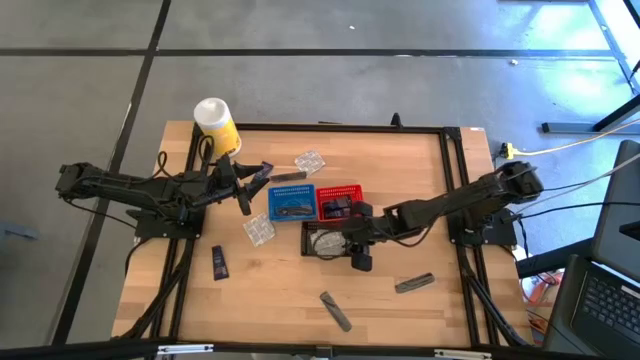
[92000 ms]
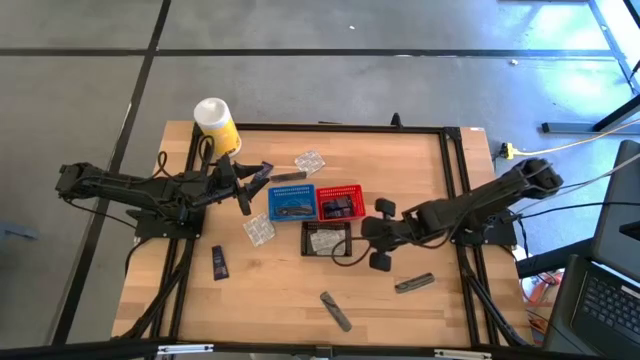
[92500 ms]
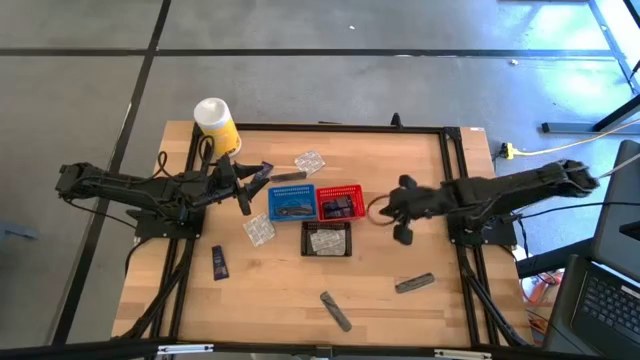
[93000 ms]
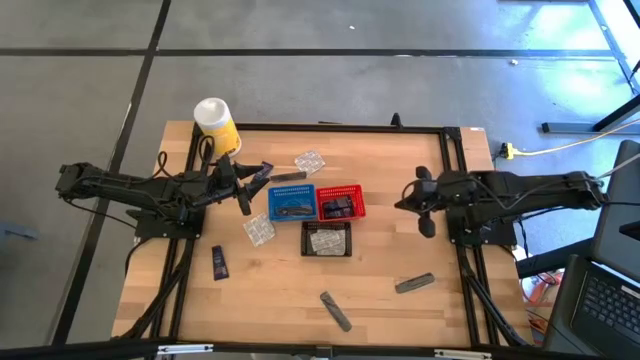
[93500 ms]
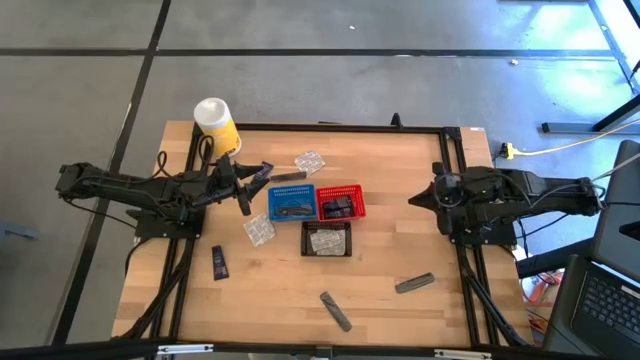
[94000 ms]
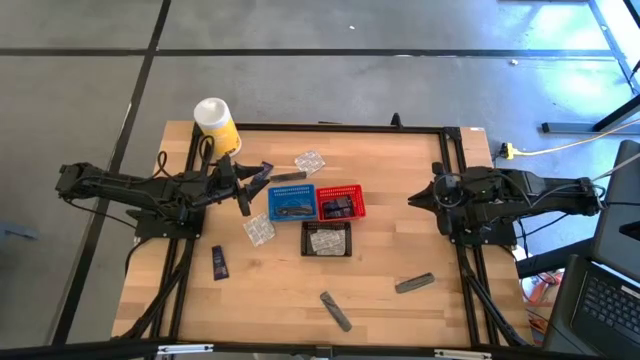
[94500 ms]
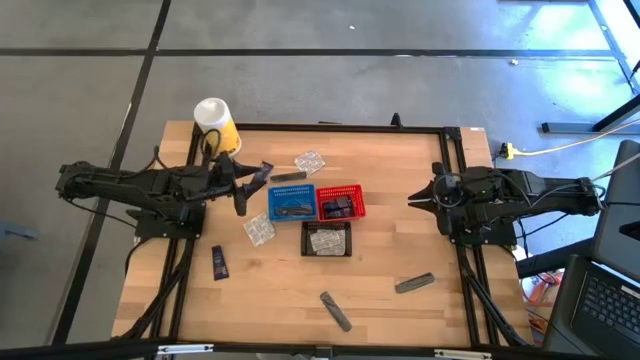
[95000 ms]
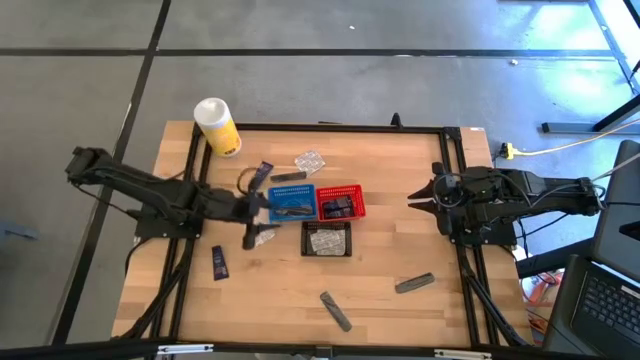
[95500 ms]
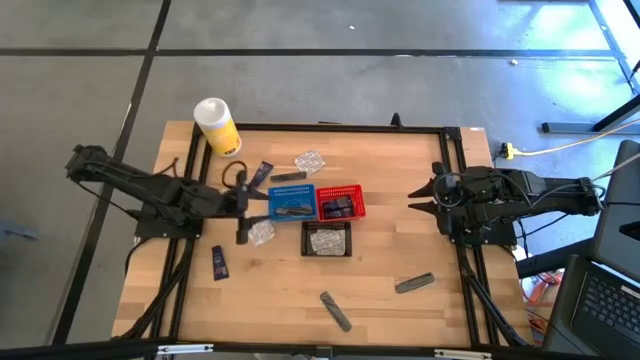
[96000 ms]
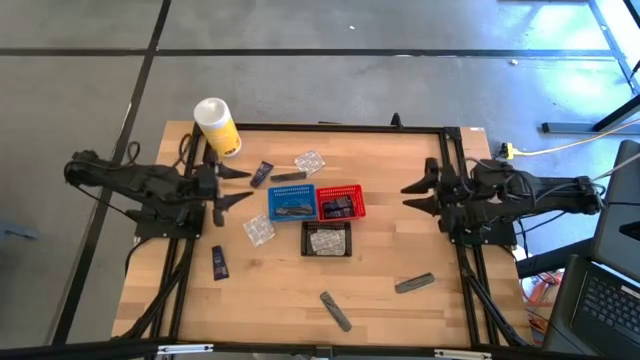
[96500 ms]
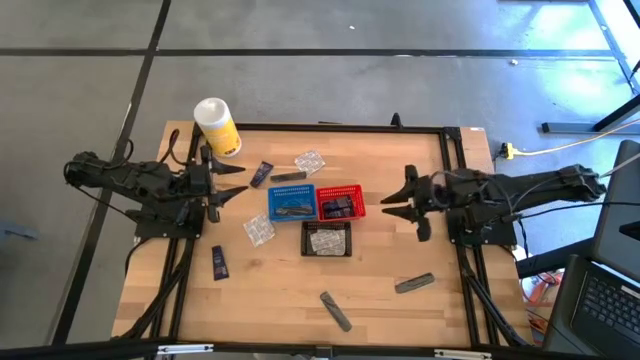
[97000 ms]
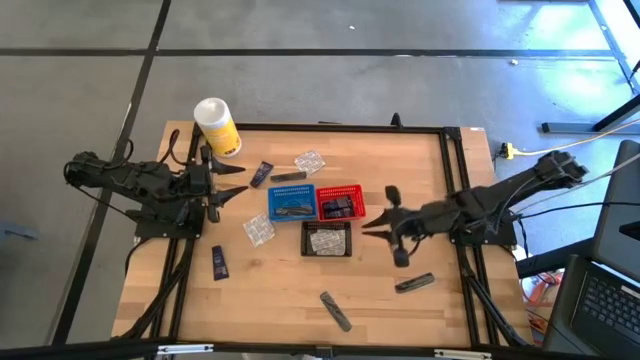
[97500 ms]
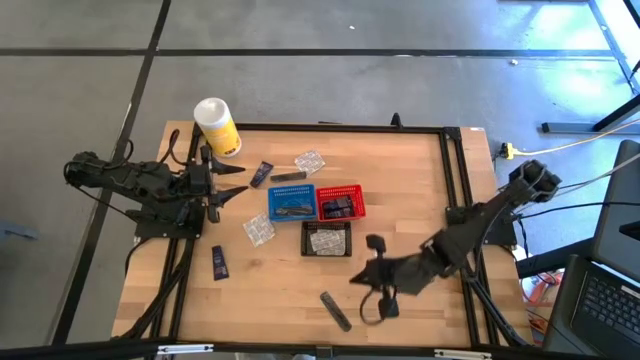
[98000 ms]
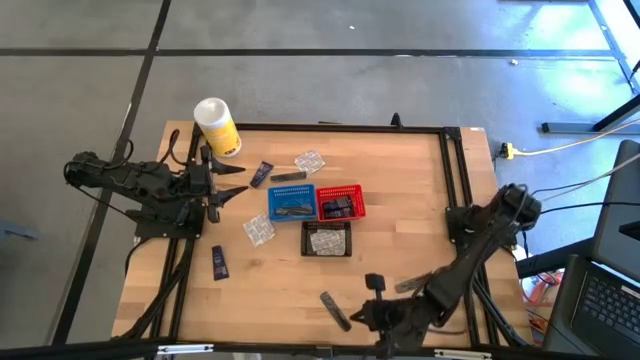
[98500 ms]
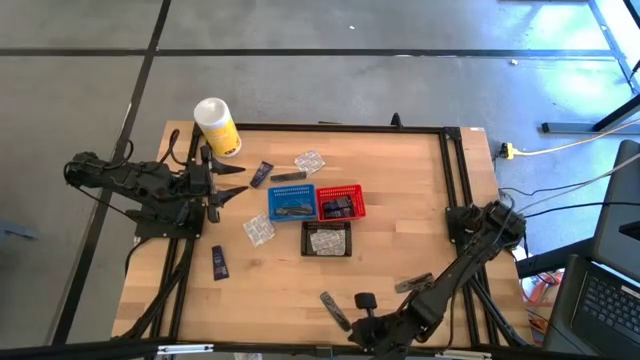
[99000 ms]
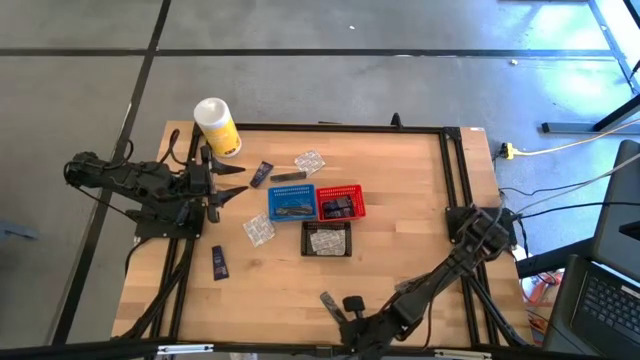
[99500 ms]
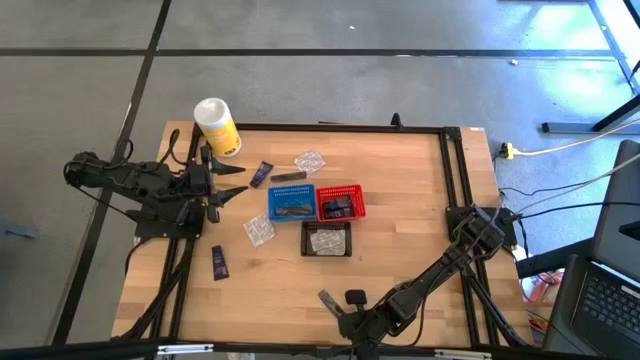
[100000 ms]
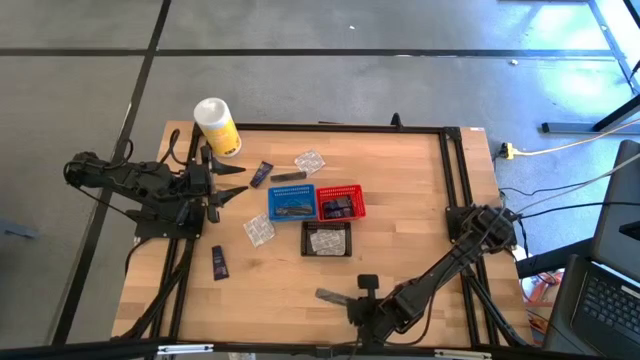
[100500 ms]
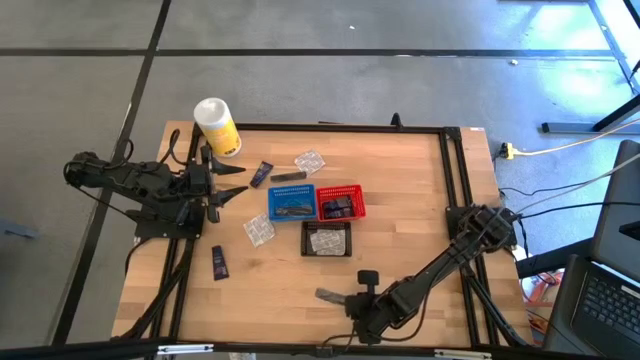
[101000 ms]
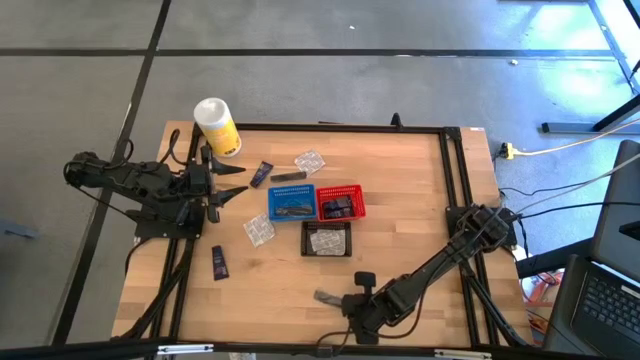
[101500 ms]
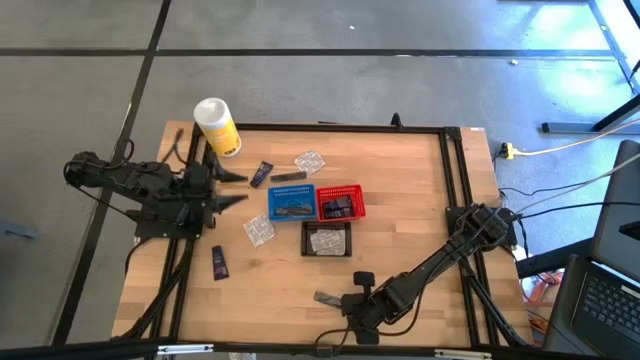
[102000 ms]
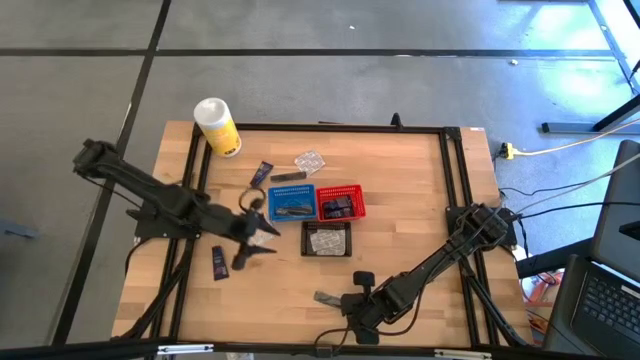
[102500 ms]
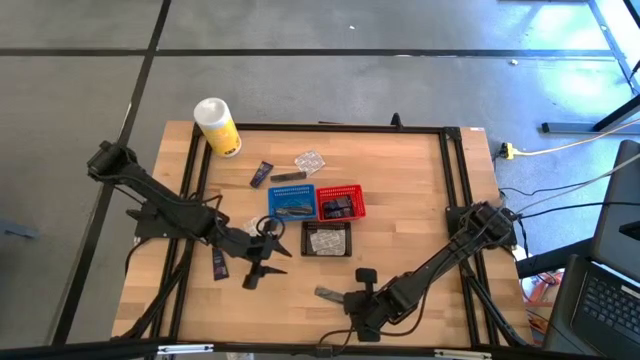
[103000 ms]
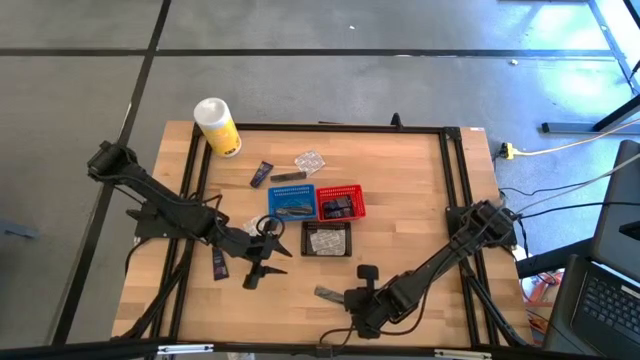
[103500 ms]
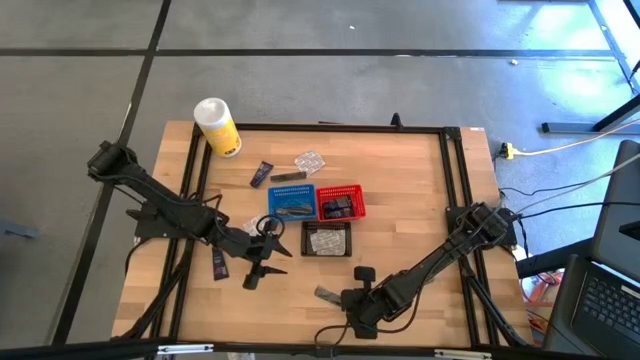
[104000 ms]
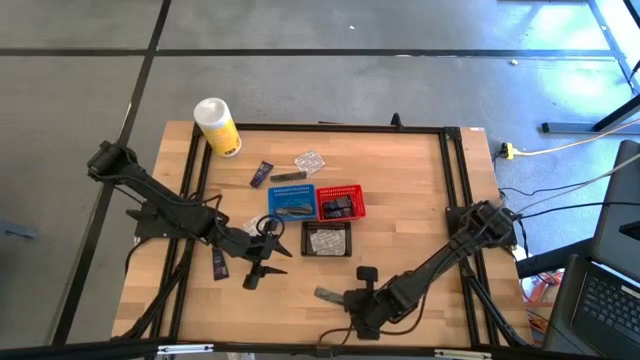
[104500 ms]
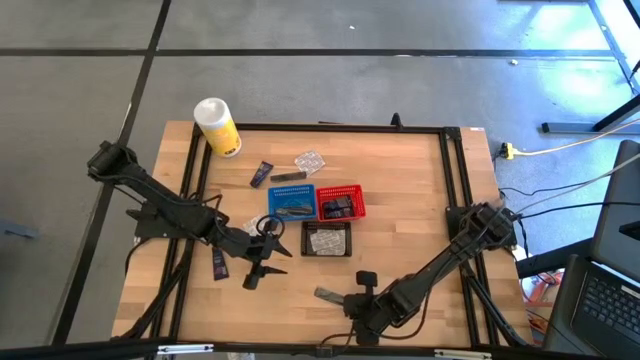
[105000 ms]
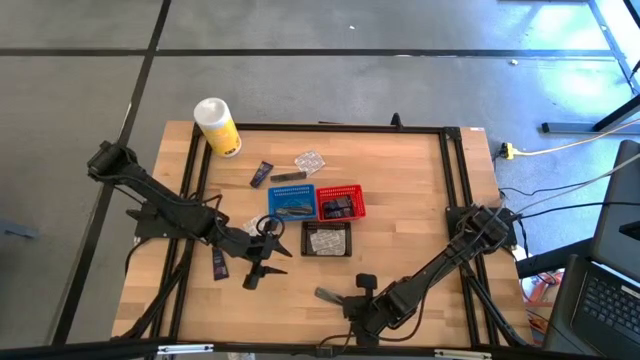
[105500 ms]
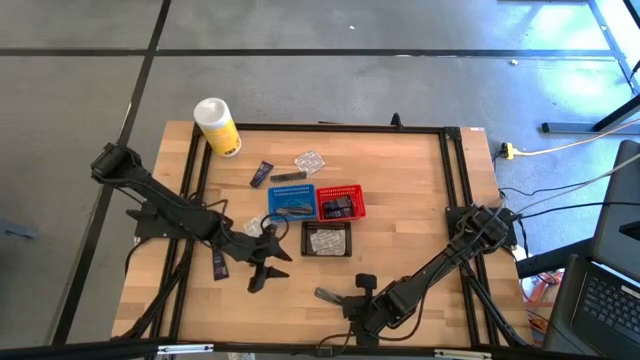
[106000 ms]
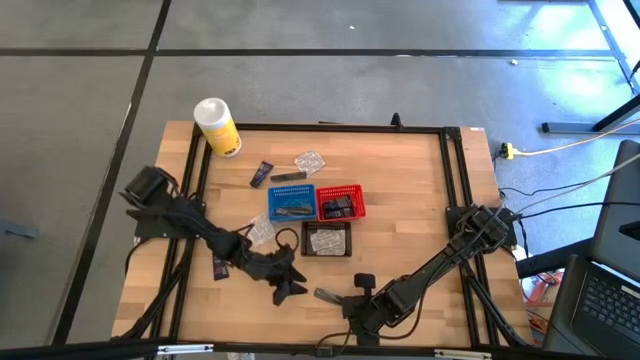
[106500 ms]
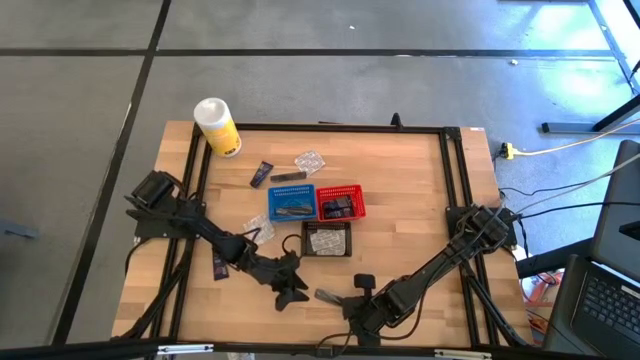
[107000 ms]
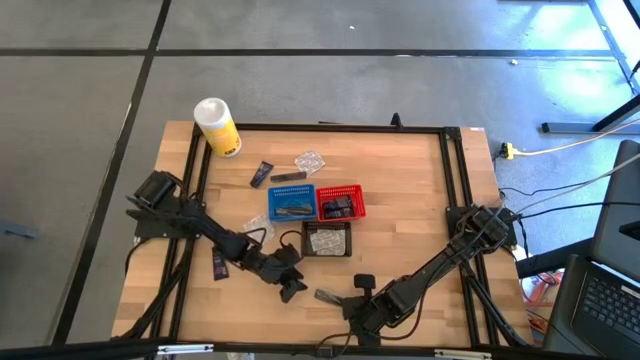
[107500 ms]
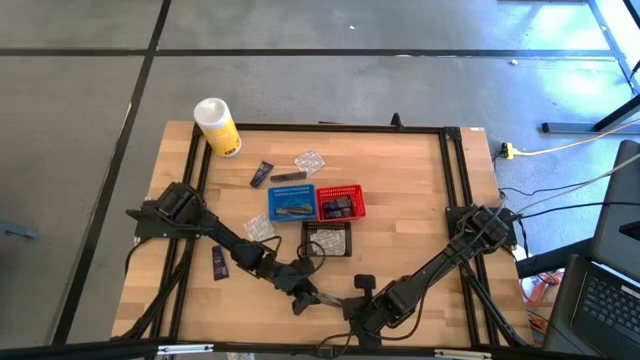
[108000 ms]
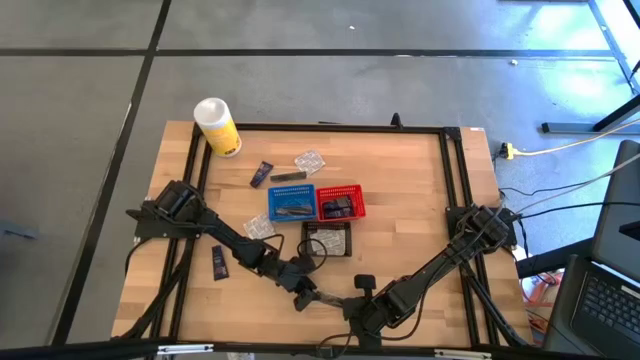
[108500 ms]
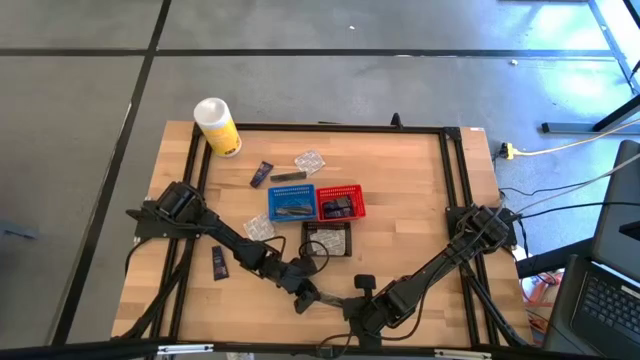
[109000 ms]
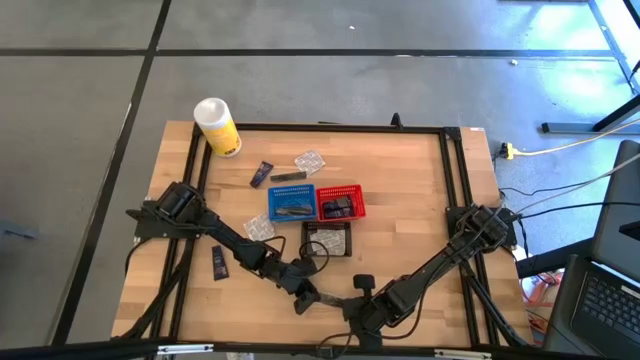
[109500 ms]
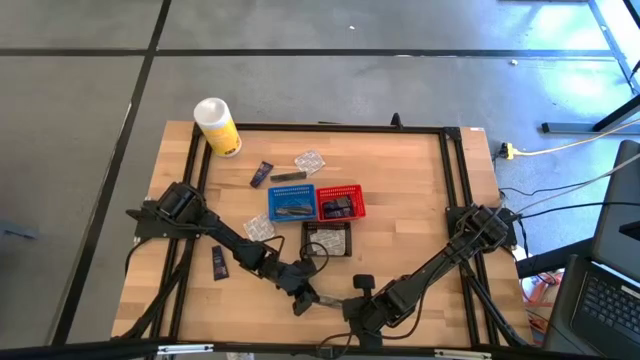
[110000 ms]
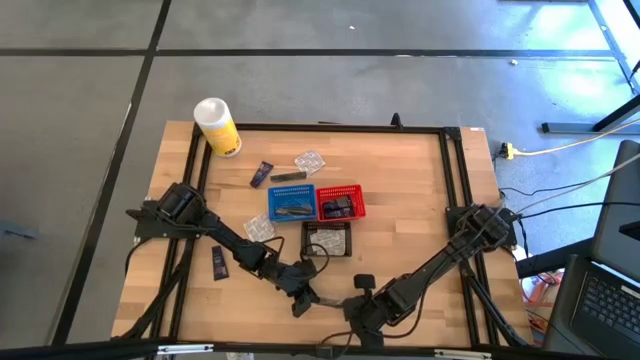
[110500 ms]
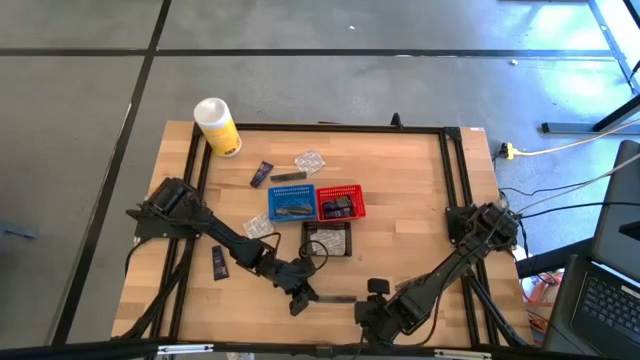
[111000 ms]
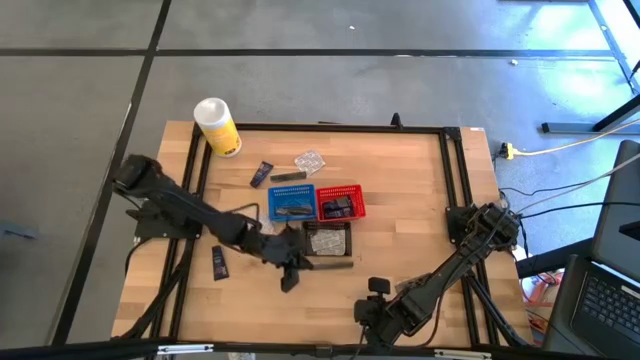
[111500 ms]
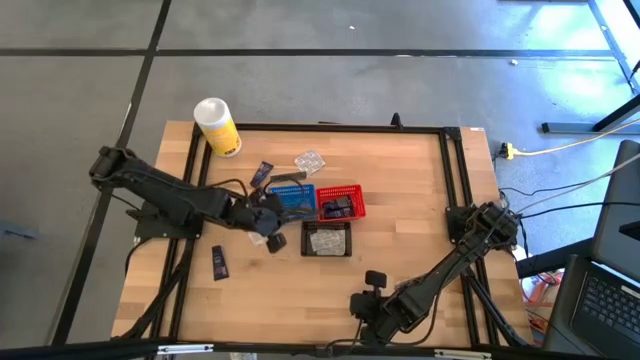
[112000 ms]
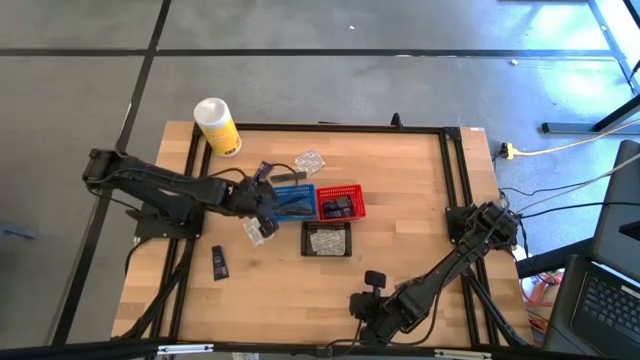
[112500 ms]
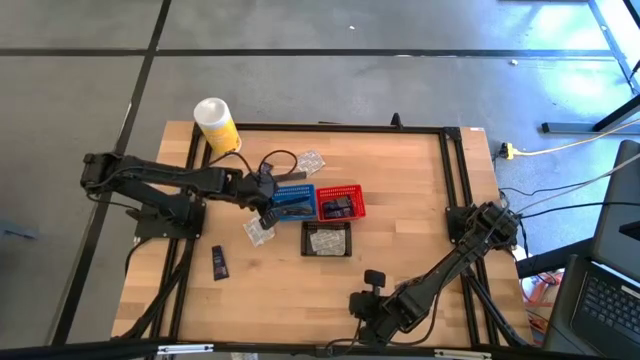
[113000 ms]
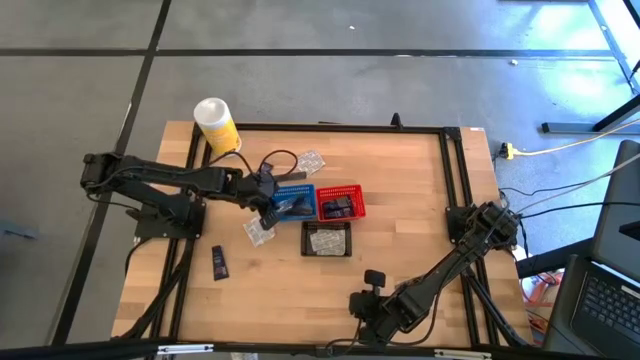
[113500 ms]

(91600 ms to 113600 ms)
Task: Pick & Place Travel size toiletries
Put the black comb into the blue bin
